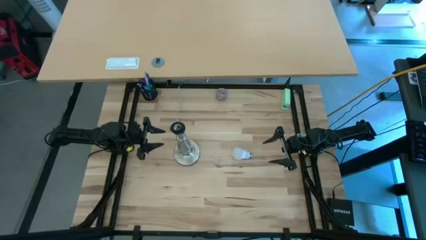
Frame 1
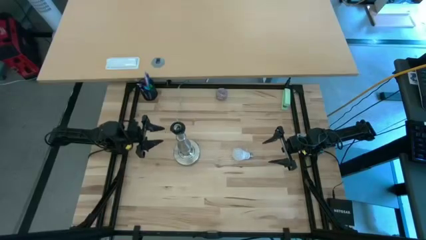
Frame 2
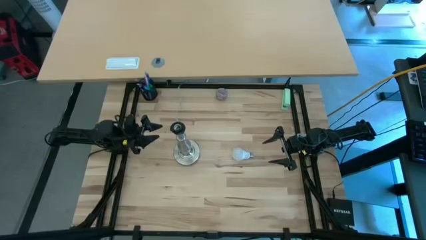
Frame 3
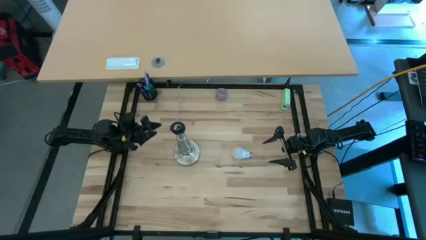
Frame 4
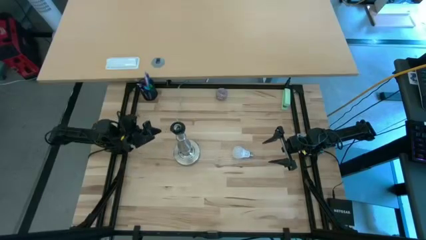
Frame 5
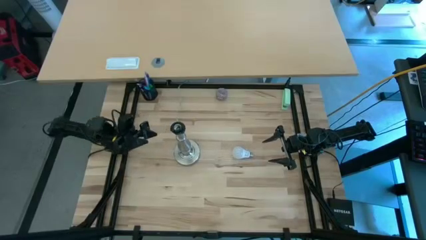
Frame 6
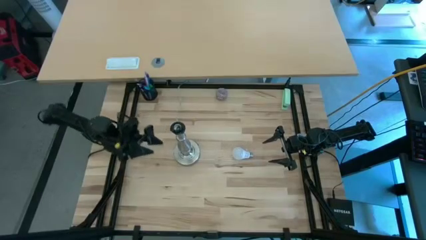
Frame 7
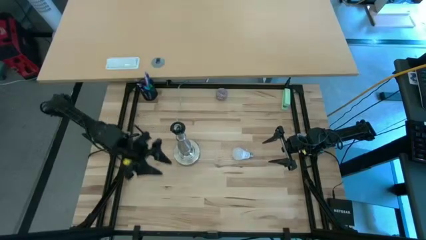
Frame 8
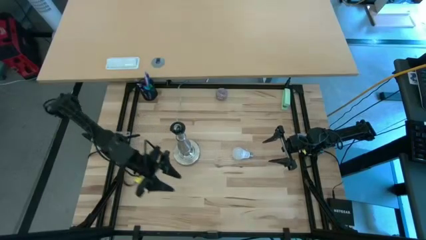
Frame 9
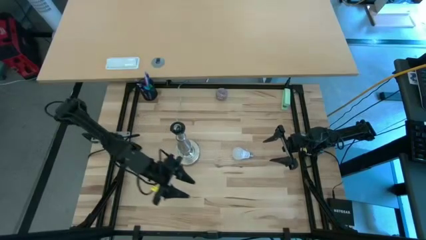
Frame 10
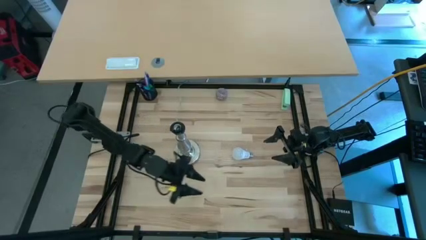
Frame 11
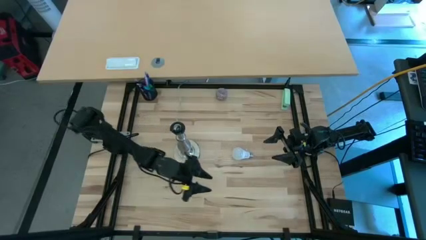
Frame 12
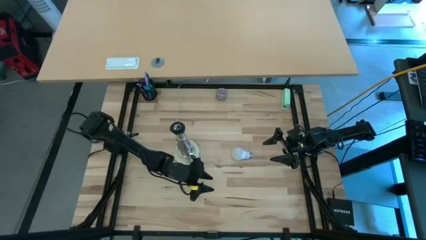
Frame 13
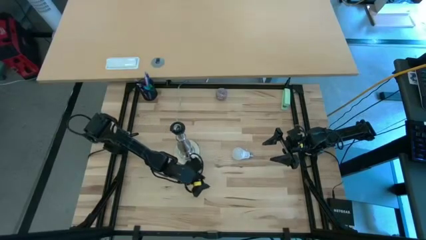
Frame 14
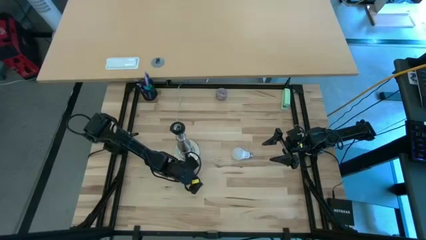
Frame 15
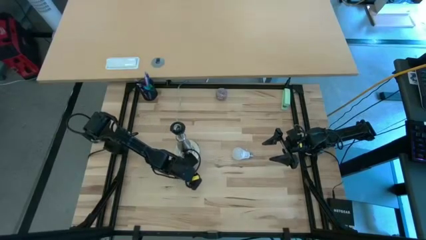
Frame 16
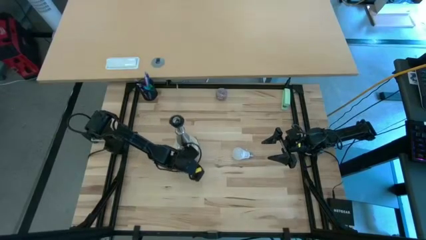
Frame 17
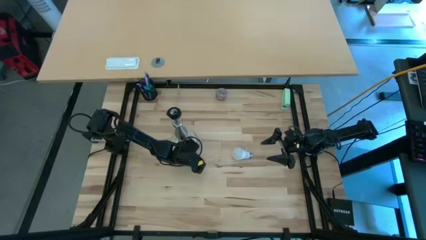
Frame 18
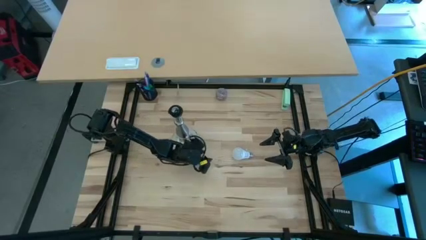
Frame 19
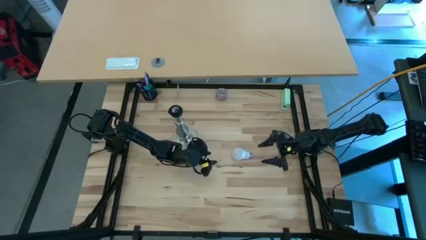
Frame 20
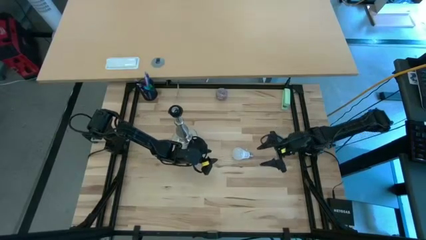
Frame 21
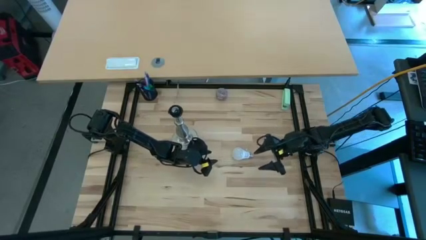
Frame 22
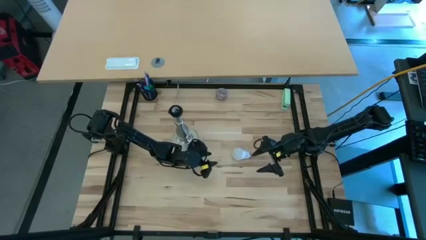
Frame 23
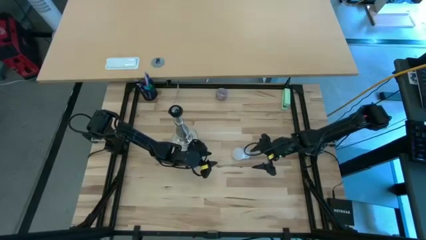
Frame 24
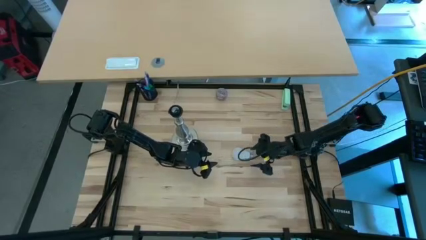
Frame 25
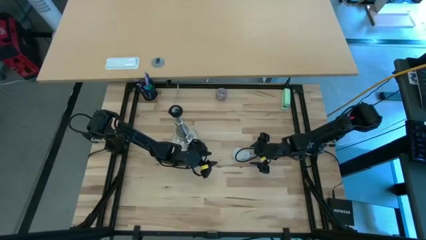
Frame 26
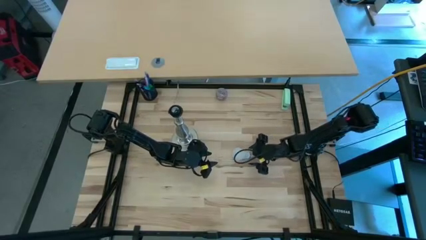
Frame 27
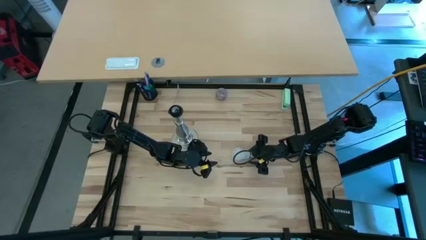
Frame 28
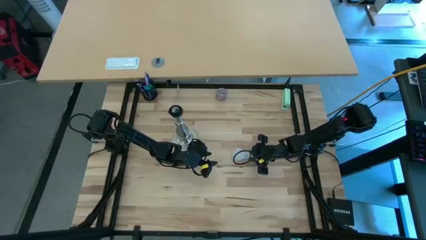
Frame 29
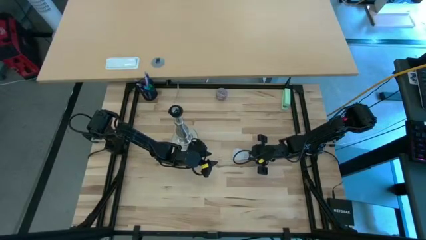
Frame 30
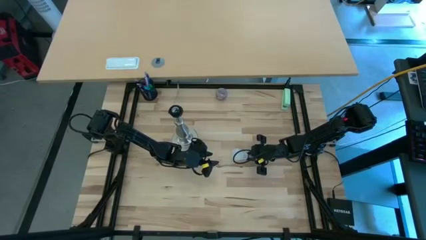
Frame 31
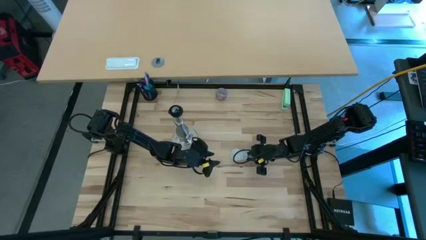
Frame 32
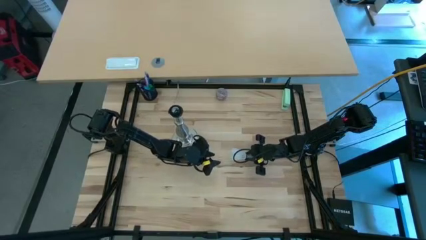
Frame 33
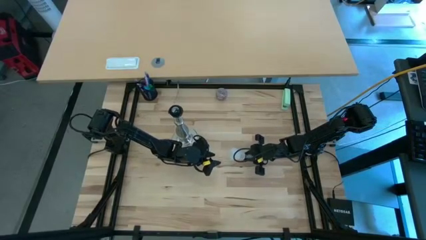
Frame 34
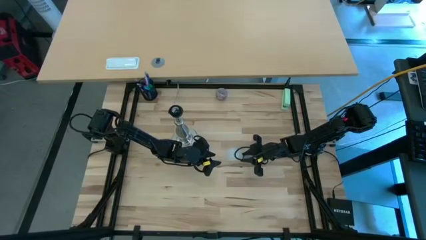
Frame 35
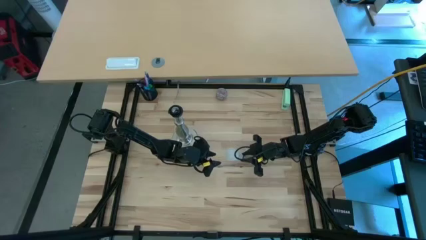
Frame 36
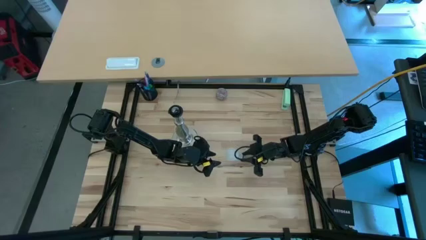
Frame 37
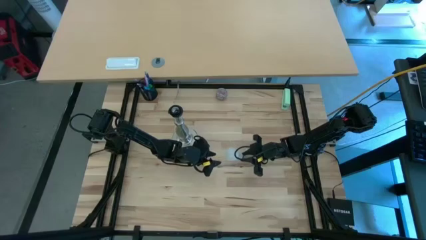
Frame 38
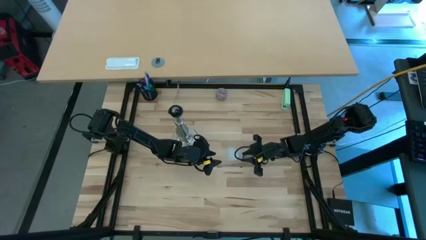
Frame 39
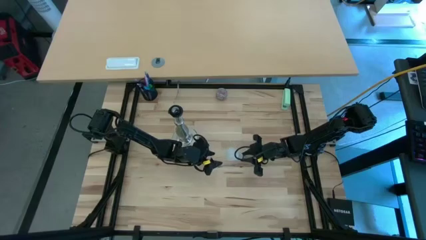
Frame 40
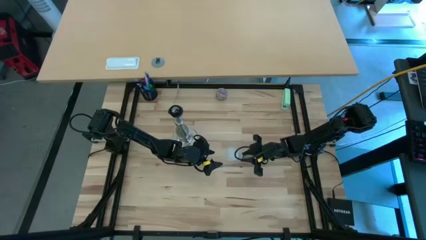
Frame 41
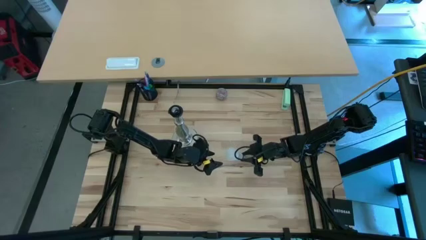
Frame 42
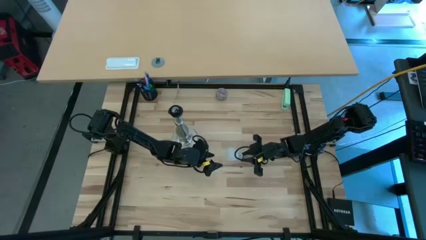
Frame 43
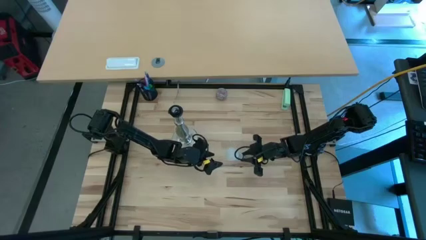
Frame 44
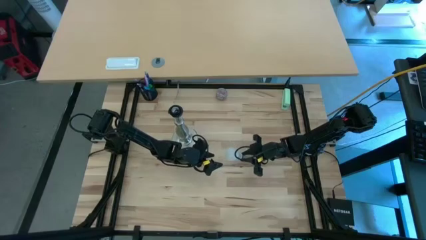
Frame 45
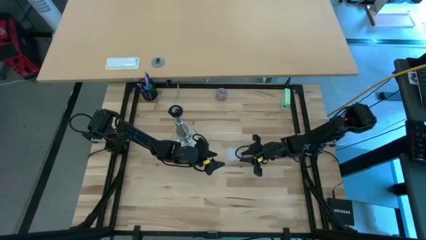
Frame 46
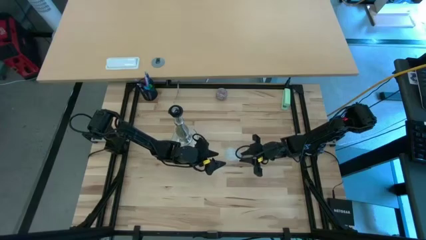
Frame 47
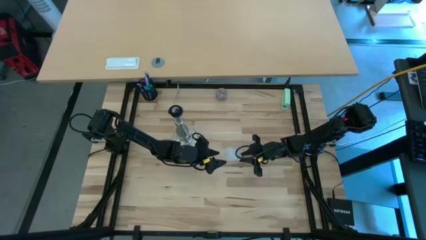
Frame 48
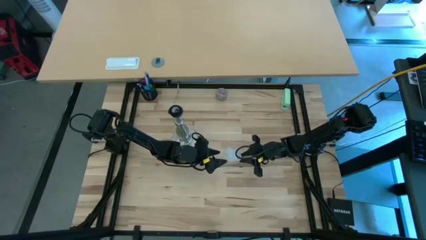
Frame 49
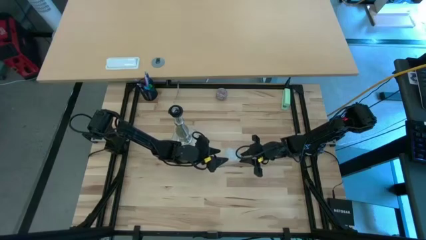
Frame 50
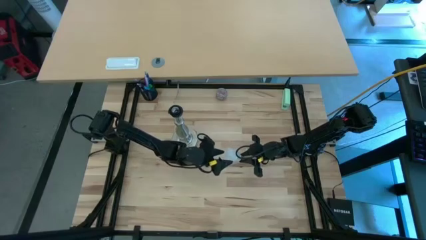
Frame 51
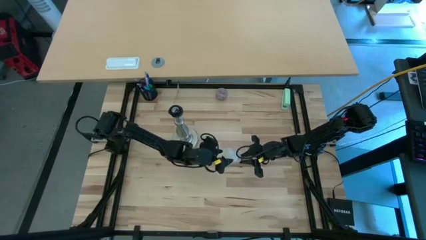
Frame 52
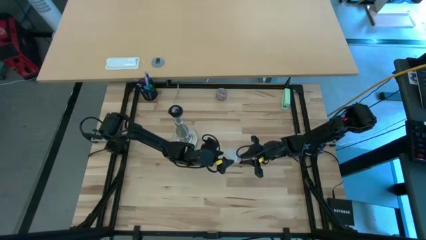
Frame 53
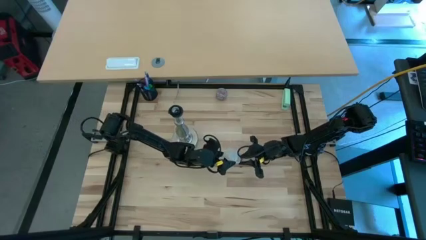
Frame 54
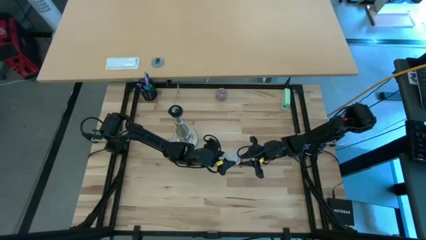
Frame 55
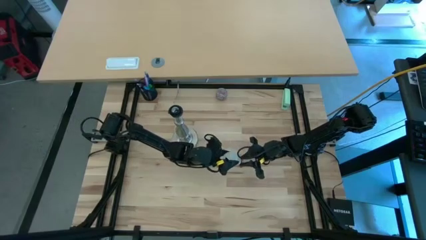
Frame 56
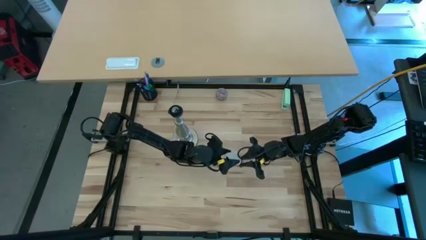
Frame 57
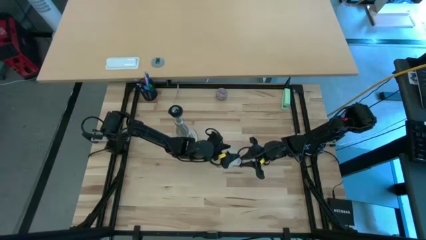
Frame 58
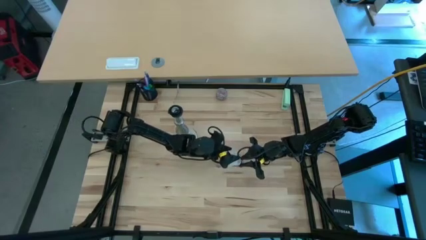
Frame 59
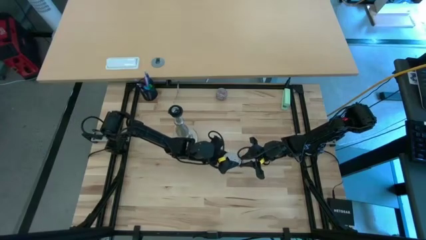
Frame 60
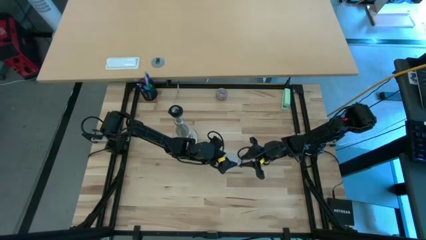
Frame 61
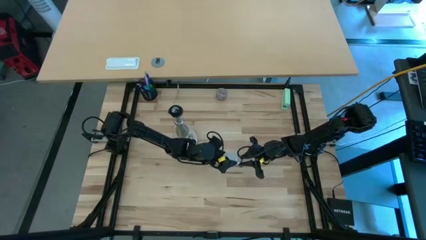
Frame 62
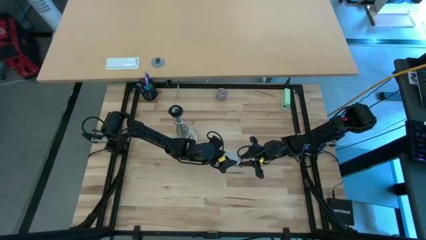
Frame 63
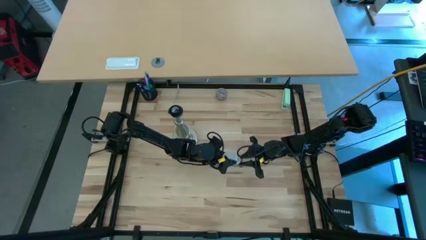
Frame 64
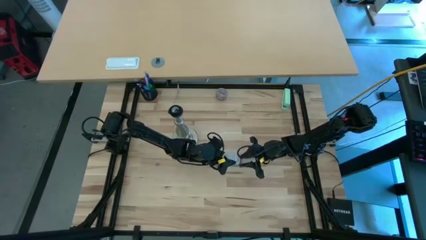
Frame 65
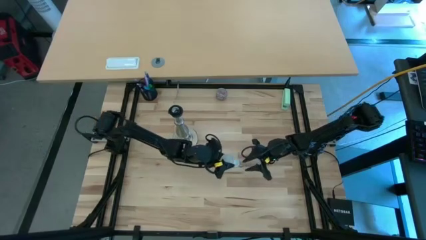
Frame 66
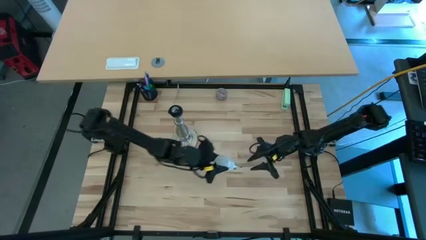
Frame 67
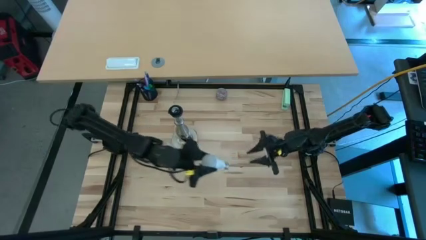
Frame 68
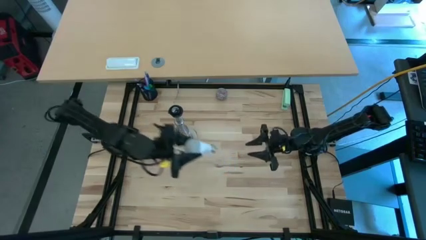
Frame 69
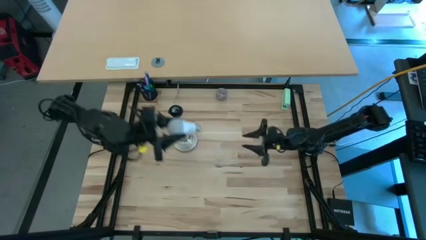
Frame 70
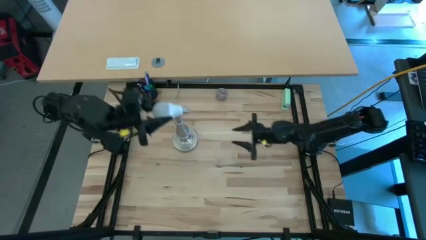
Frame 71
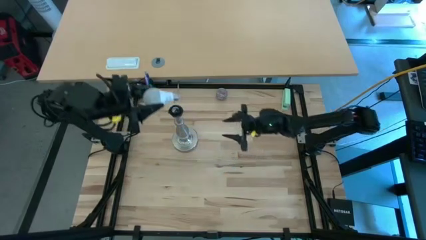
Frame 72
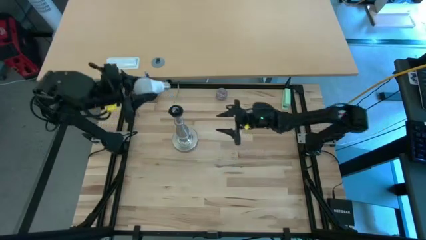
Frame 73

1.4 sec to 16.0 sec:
Task: Screw lightbulb
Insert the lightbulb into the silver lamp
